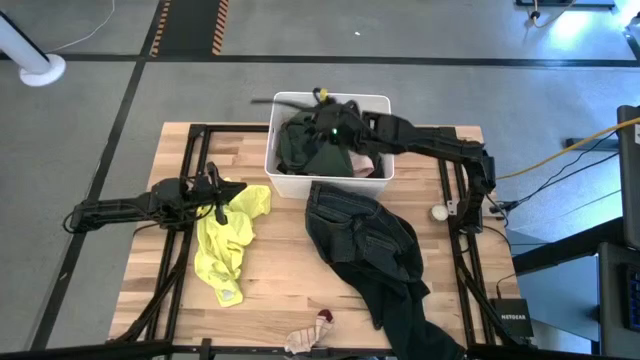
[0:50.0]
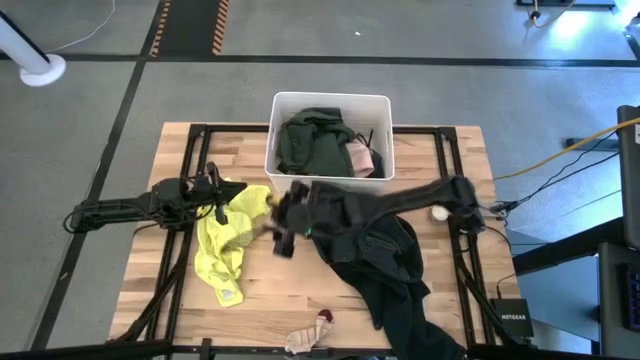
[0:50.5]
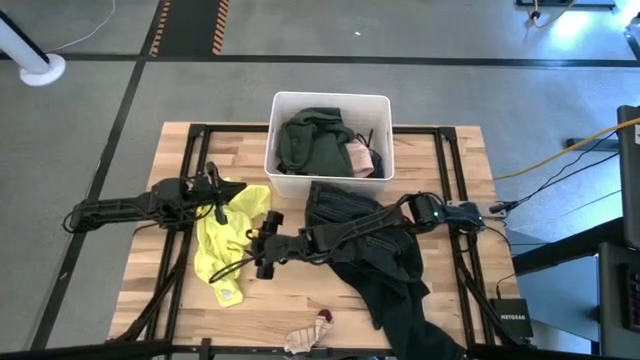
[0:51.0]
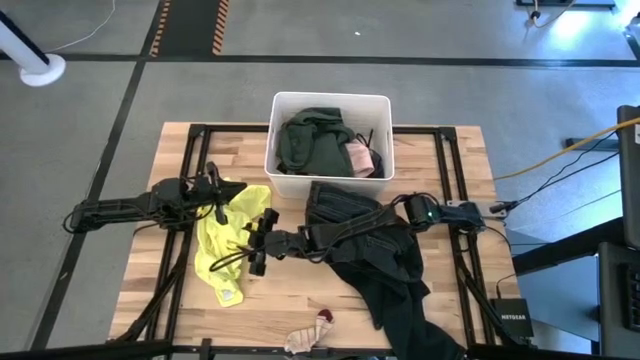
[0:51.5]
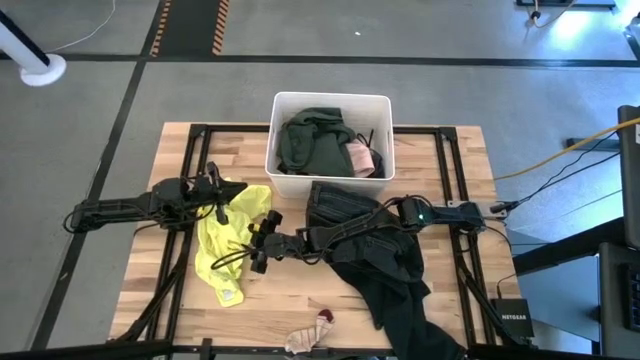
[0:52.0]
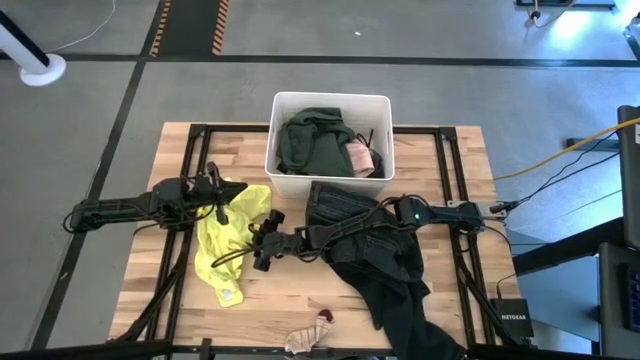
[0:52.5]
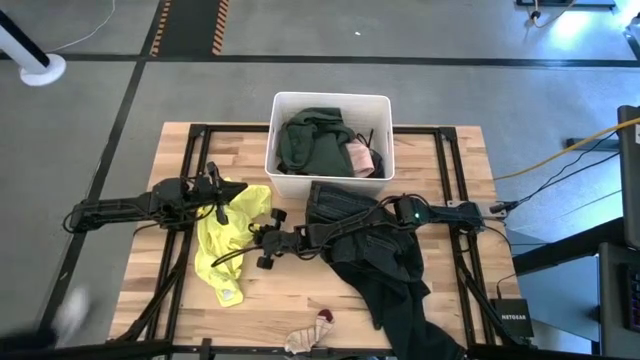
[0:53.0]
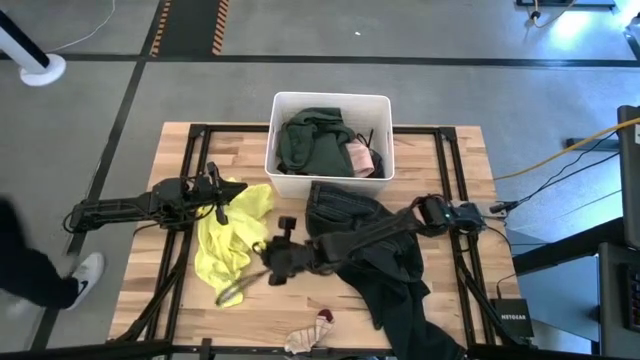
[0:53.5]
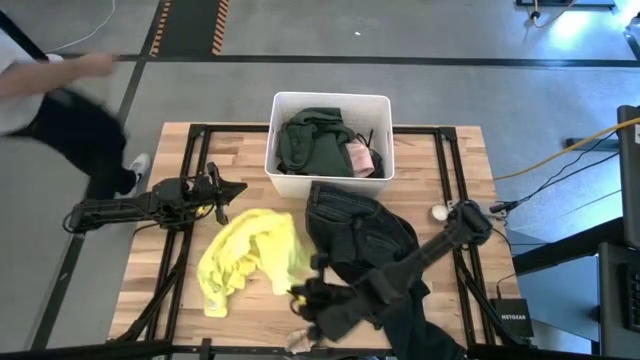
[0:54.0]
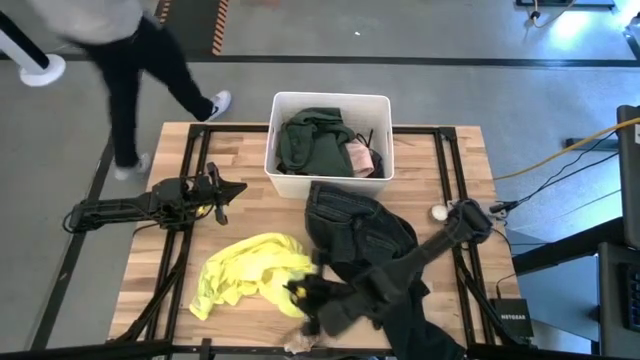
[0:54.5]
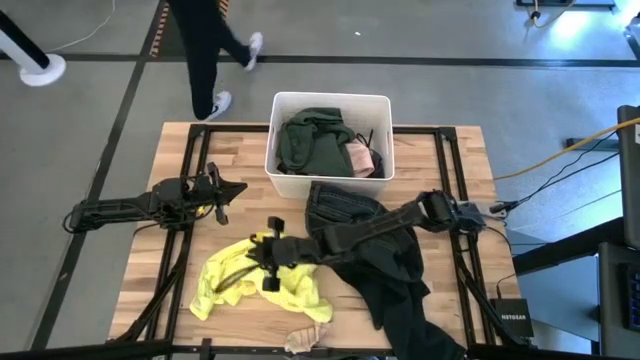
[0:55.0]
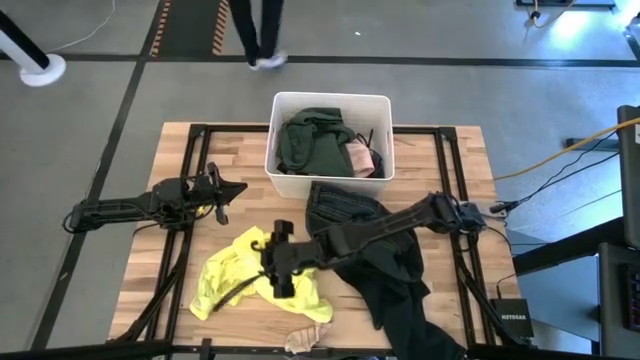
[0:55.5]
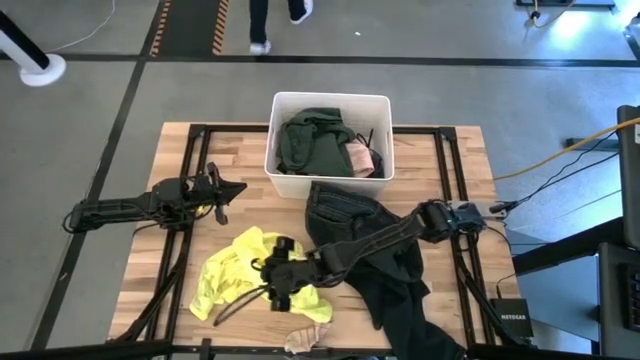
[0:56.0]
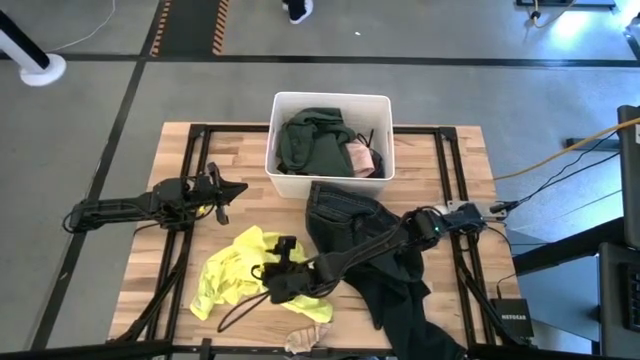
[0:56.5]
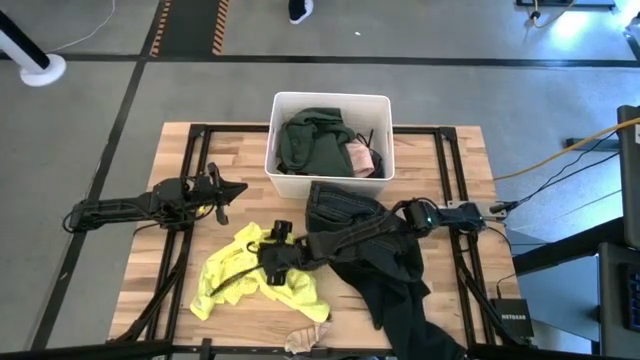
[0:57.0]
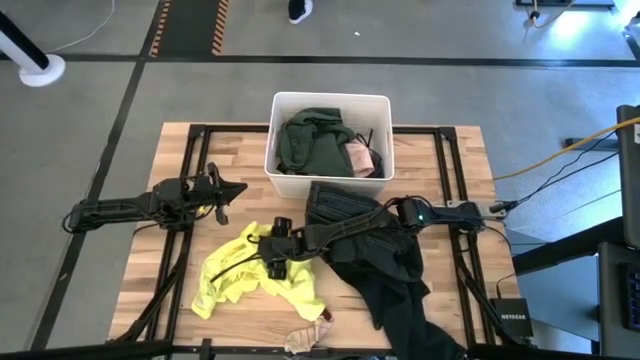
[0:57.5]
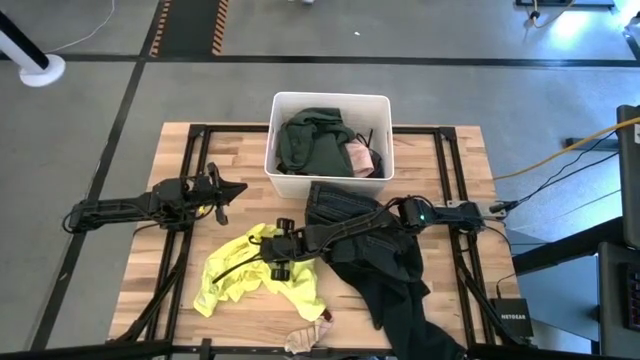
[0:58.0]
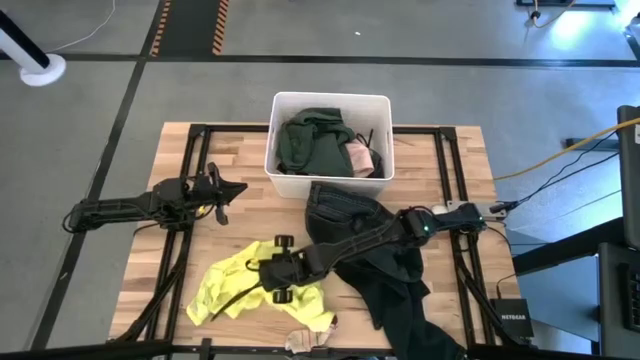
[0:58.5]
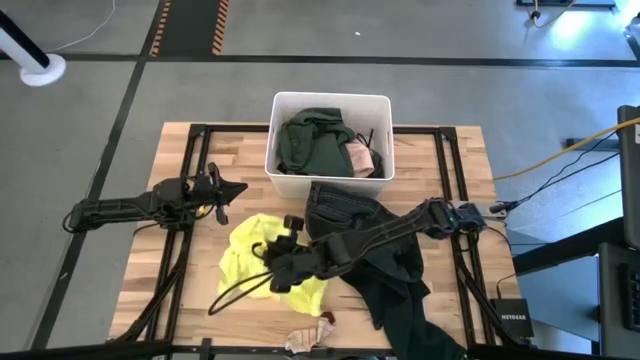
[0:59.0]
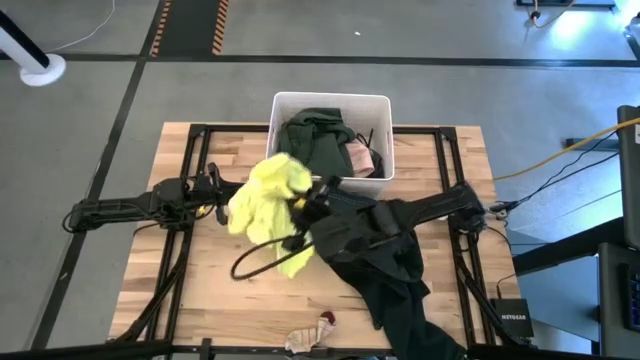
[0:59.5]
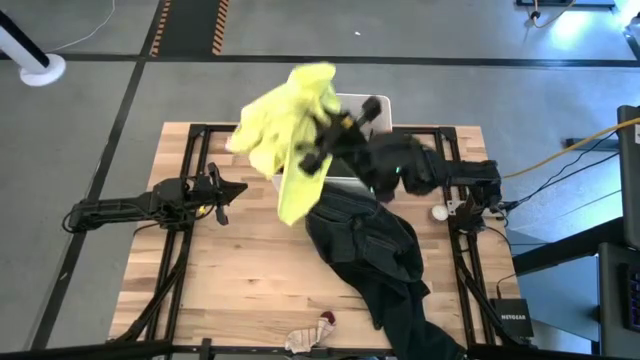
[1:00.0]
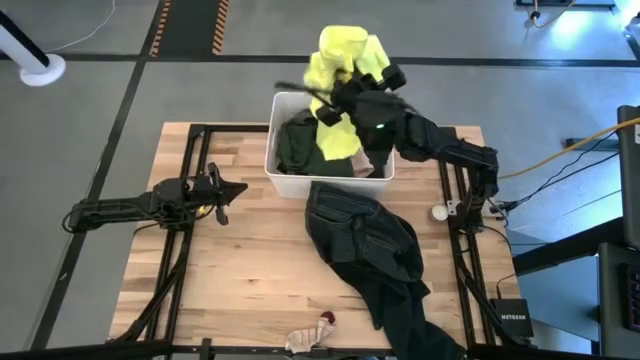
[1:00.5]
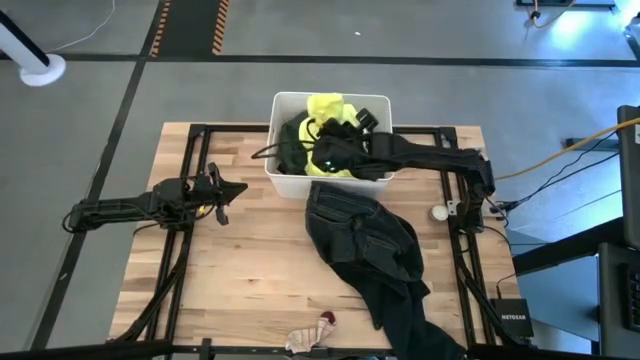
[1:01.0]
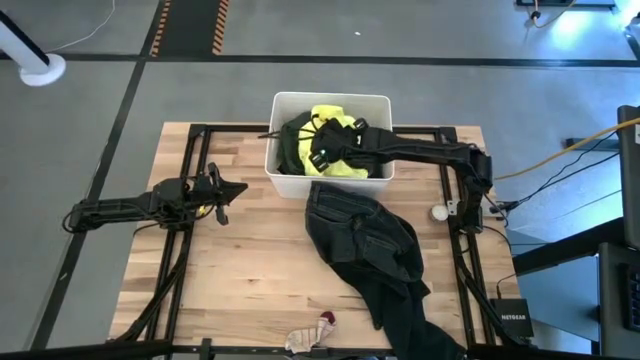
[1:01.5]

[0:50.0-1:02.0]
Task: Sort clothes
Put the yellow shirt into the white laundry organizer

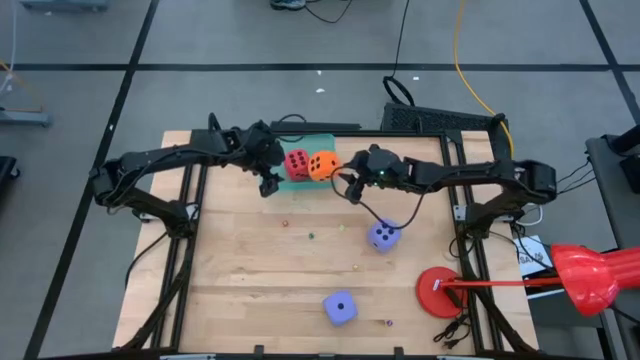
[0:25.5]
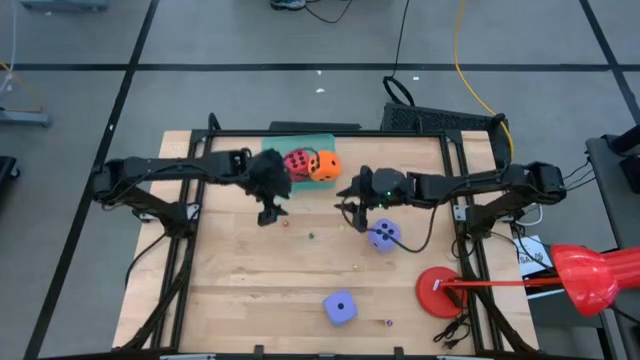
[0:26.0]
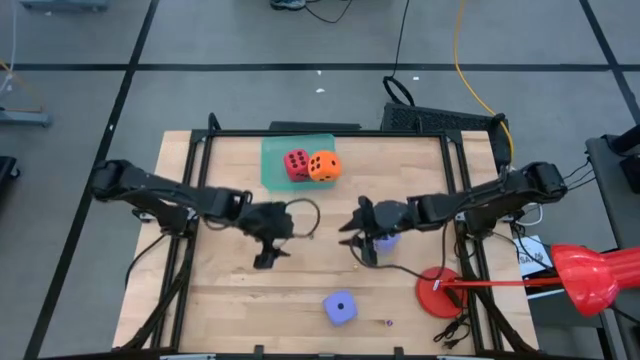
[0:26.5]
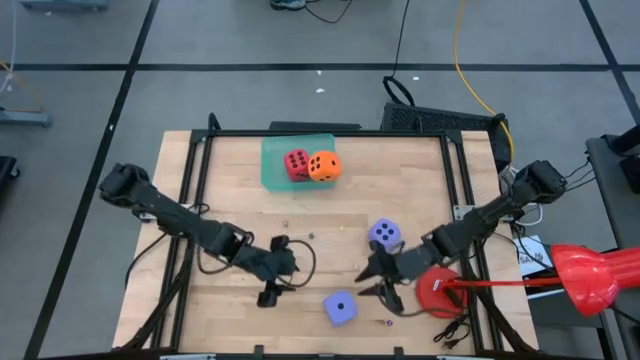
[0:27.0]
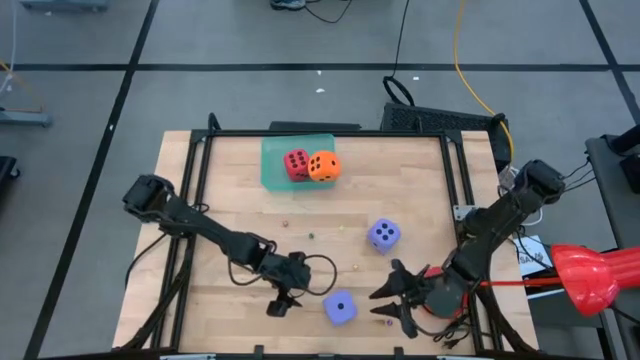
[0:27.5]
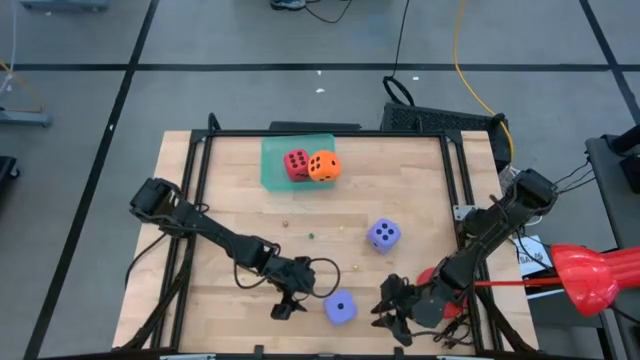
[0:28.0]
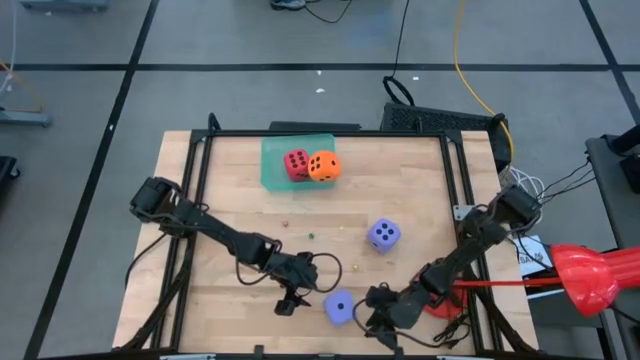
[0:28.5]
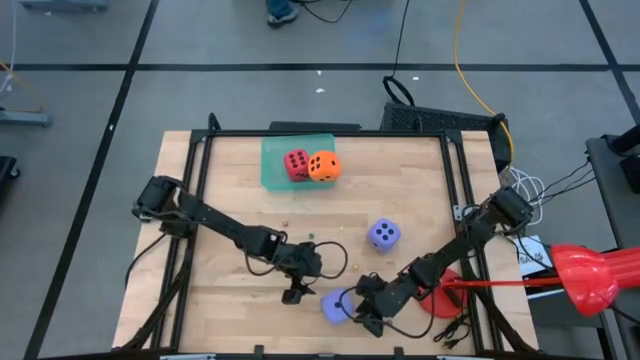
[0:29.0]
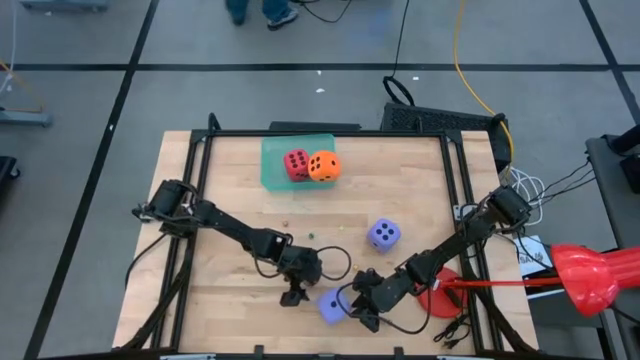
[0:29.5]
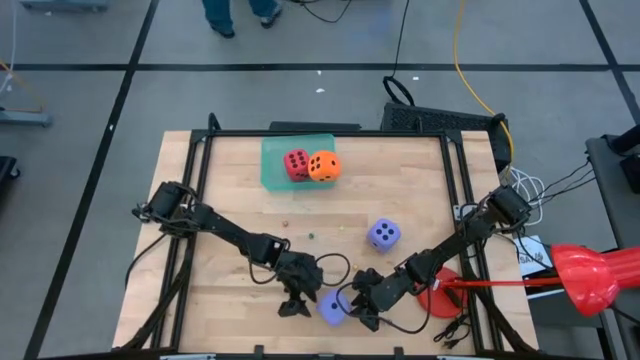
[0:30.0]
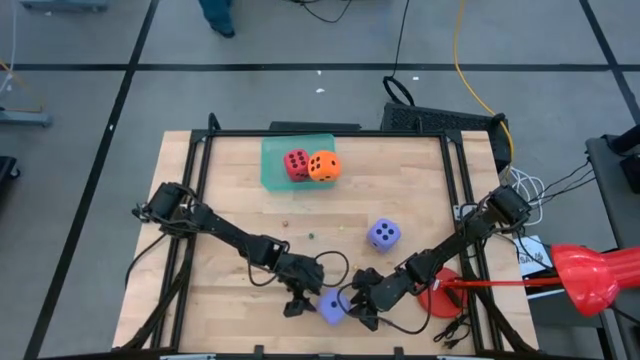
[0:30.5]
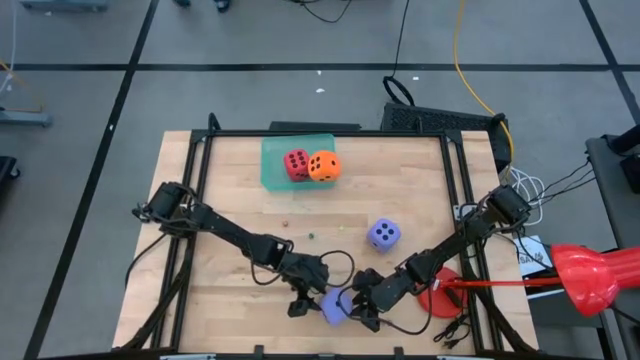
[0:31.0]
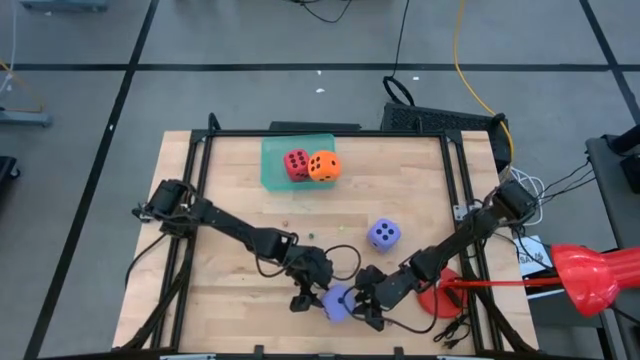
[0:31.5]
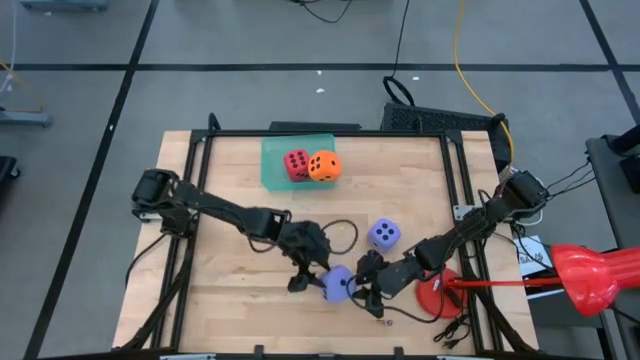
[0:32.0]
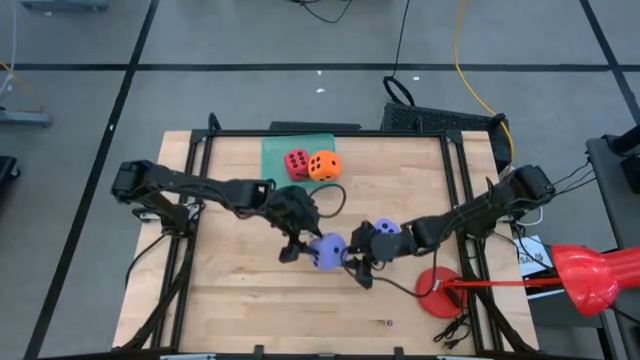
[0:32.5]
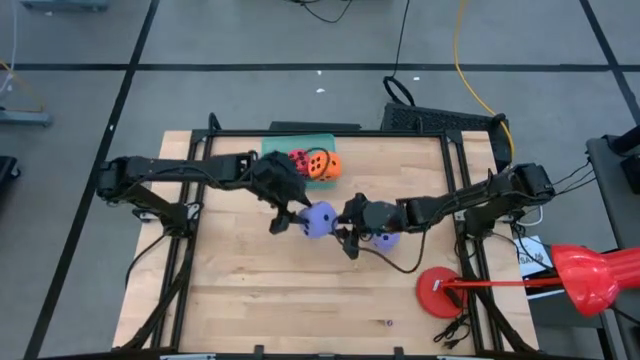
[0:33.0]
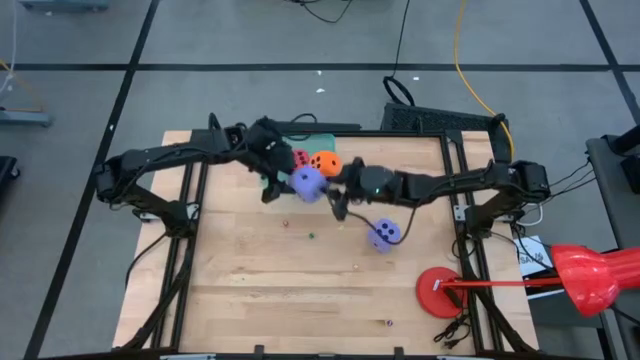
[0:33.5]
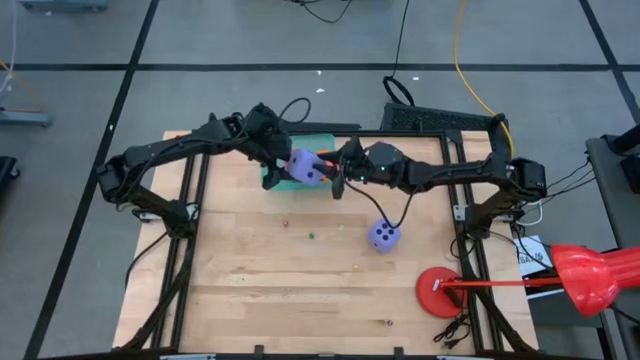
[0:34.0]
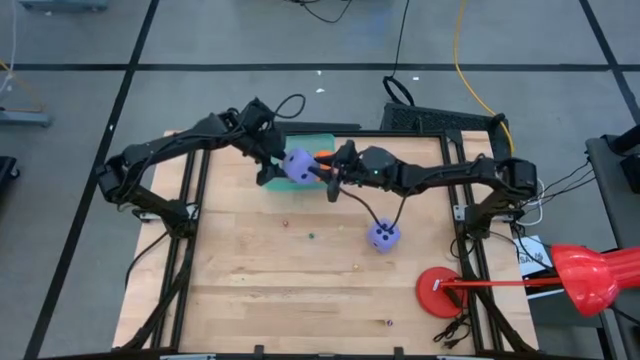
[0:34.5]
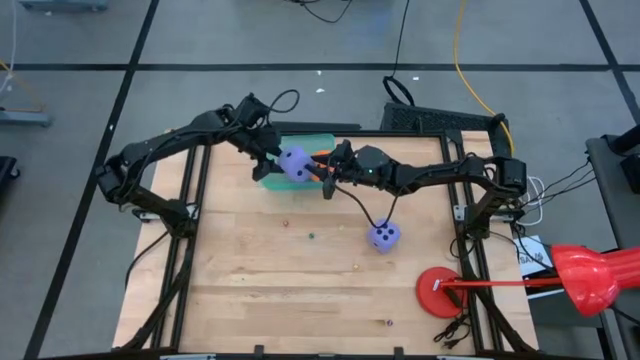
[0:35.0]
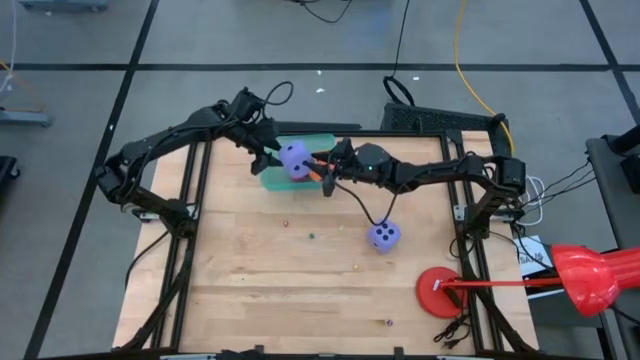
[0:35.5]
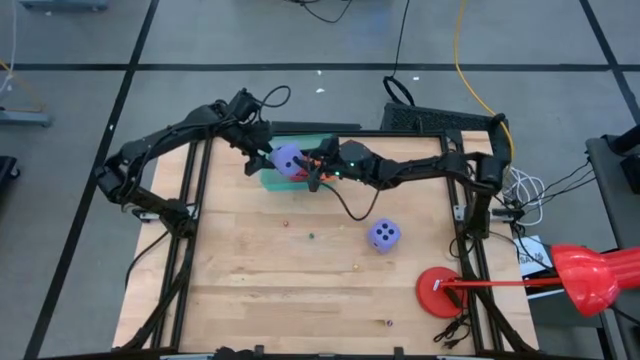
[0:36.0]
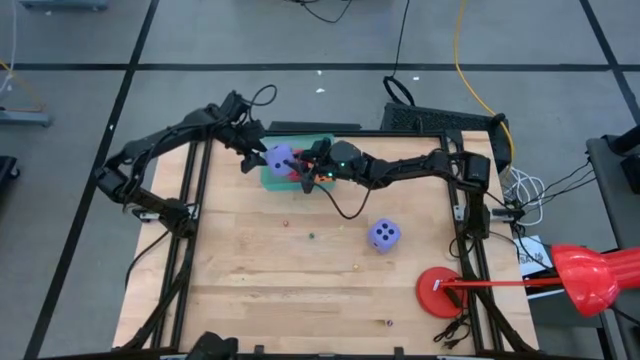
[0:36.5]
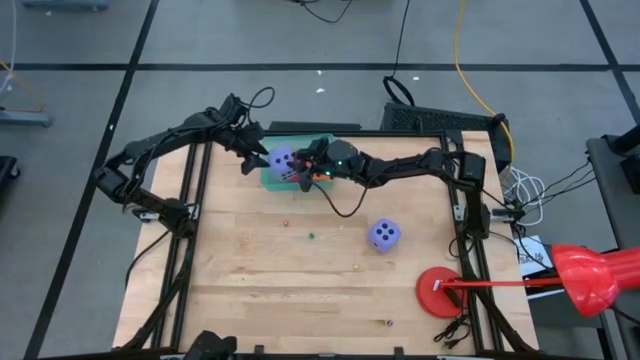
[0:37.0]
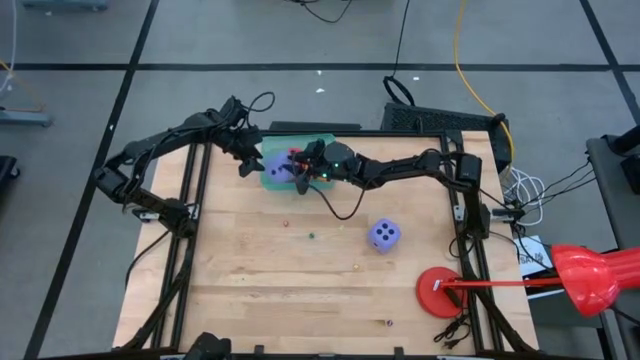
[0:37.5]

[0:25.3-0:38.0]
Task: Pick & Place Dice
Put the bottom large purple dice into the green bin
